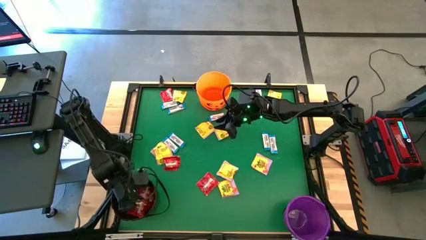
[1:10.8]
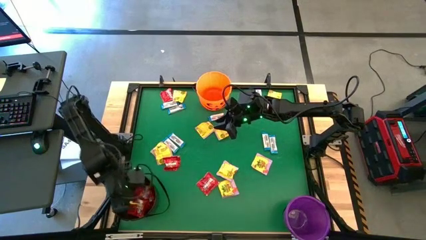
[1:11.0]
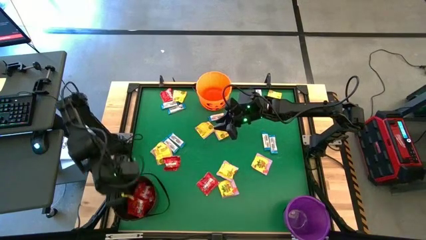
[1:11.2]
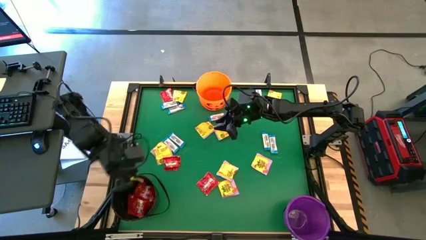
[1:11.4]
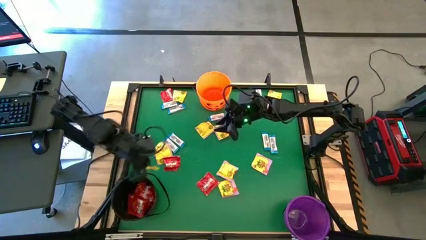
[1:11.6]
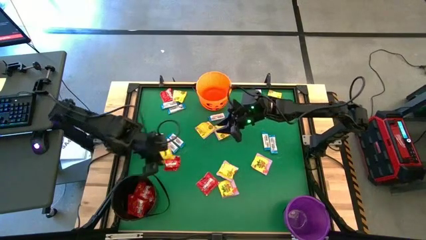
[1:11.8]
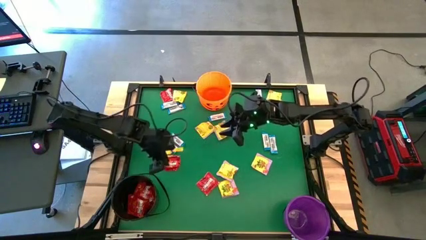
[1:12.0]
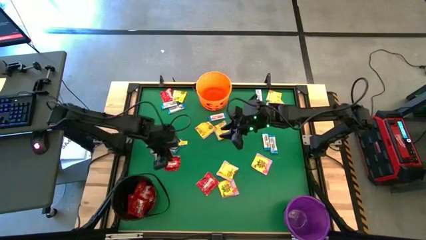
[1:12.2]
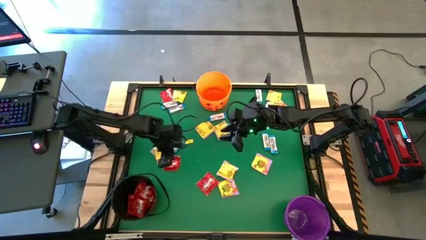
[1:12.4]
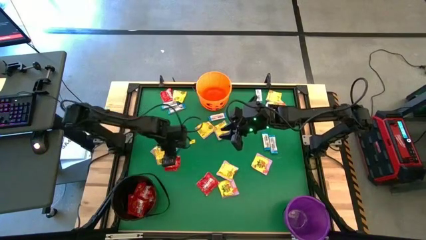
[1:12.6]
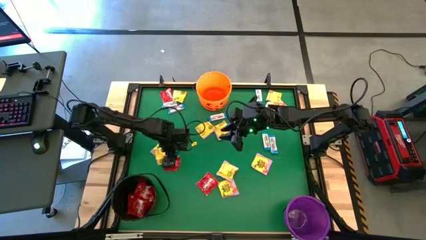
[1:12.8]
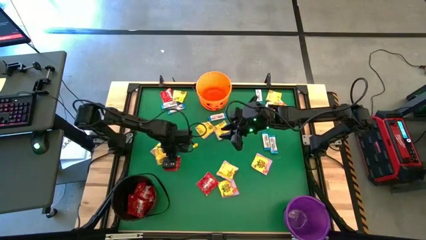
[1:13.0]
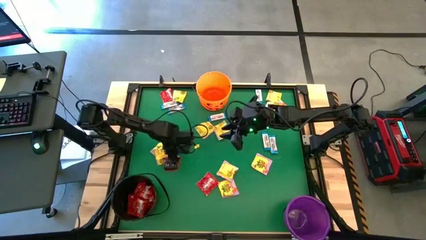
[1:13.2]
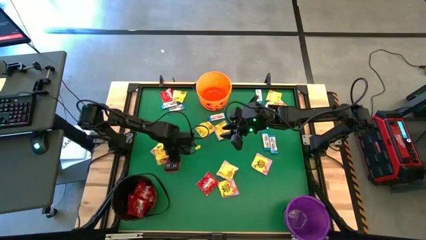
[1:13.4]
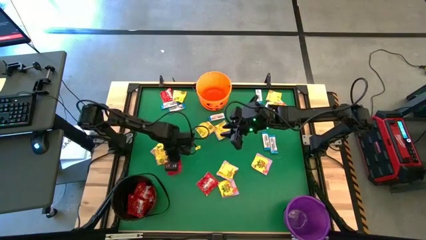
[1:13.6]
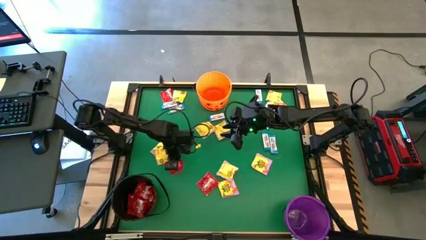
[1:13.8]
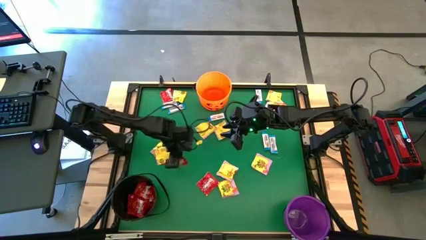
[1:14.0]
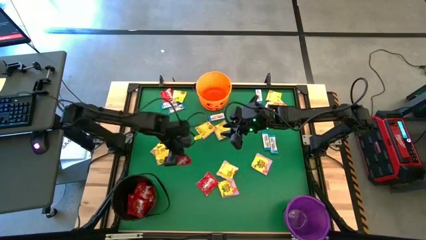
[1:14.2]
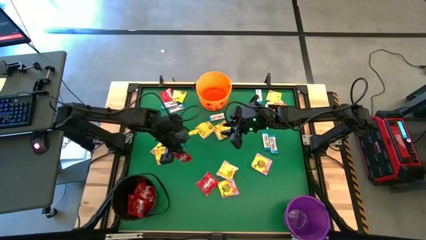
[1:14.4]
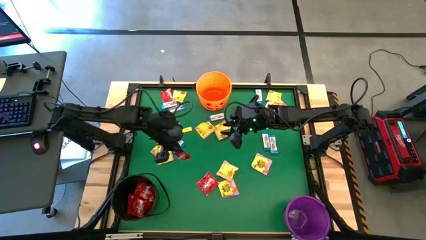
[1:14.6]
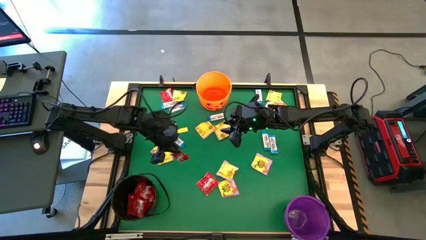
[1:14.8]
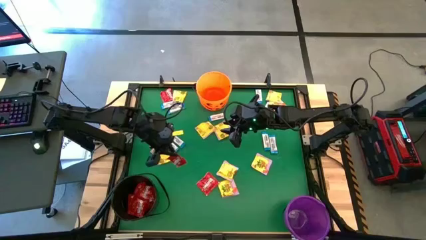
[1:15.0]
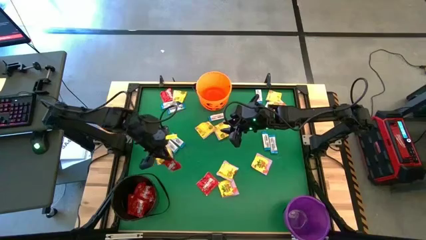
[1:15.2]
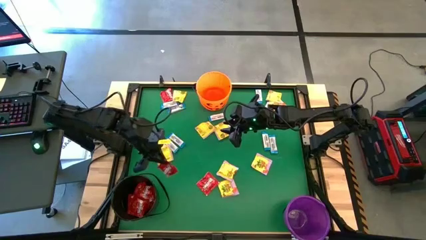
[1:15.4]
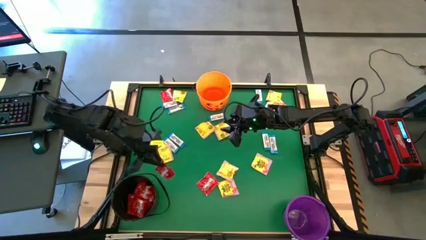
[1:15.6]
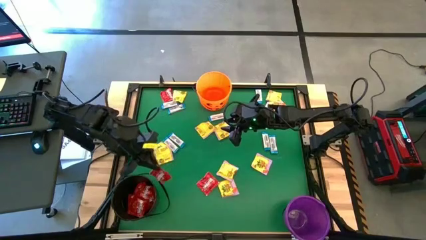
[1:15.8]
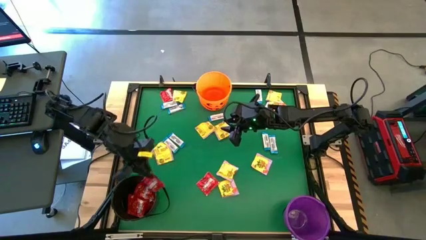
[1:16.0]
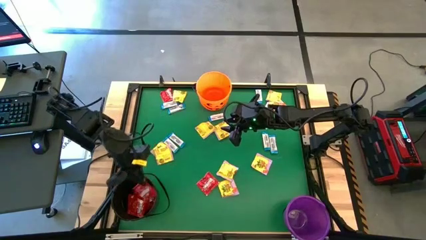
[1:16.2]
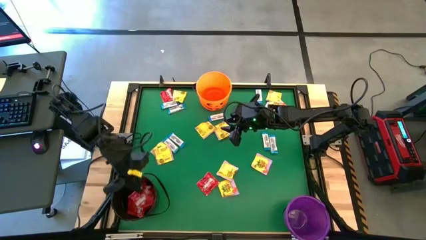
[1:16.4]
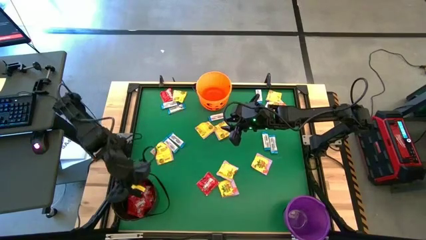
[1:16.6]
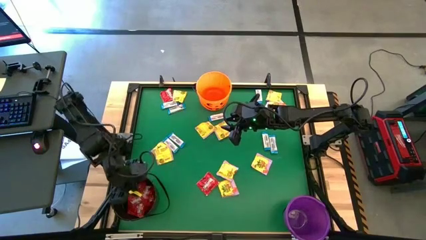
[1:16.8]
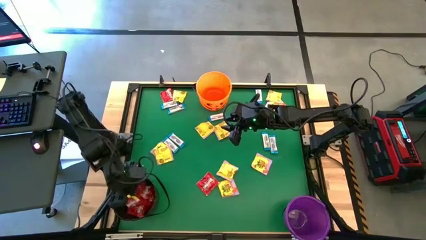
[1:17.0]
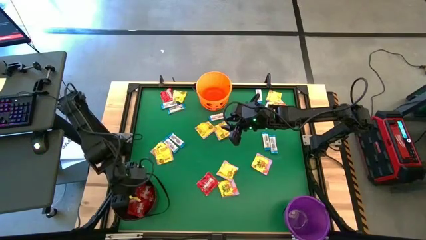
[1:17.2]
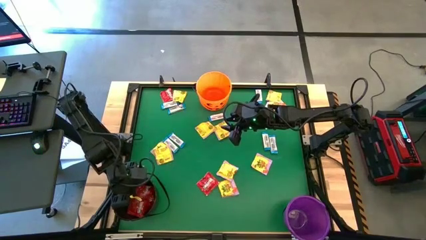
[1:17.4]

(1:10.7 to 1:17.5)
Task: Sort candy by brand, put in halloween buckets
Put the red candy into the black bucket

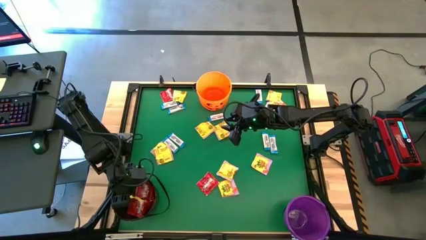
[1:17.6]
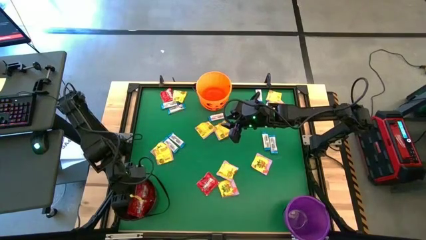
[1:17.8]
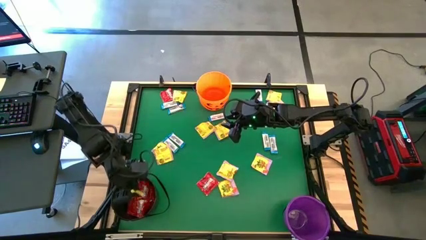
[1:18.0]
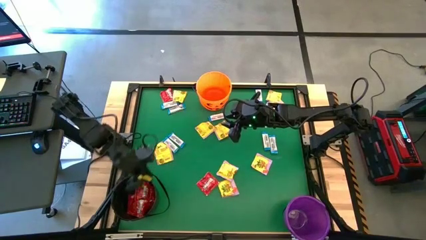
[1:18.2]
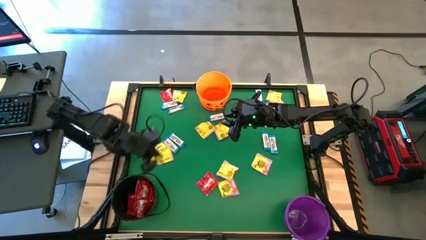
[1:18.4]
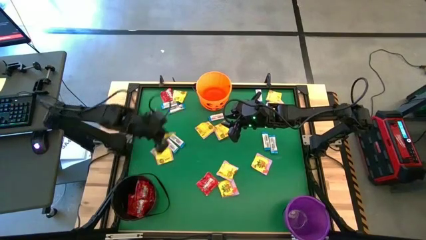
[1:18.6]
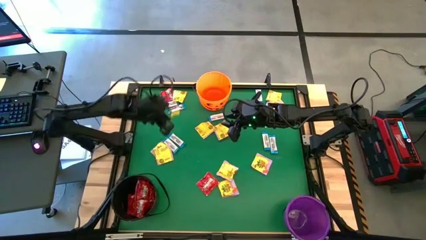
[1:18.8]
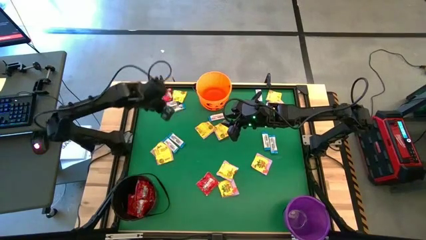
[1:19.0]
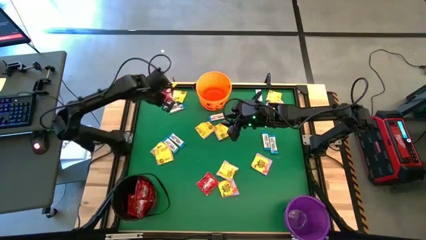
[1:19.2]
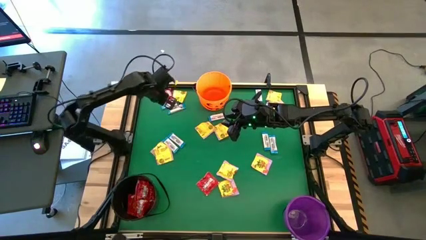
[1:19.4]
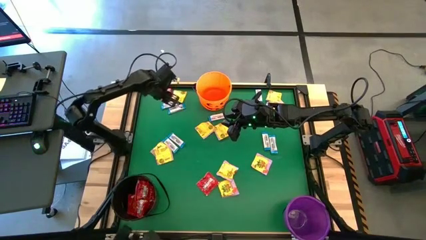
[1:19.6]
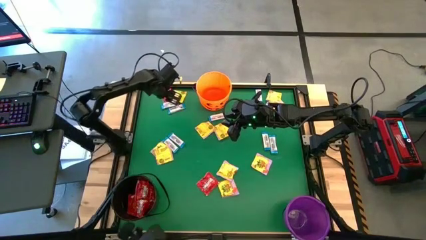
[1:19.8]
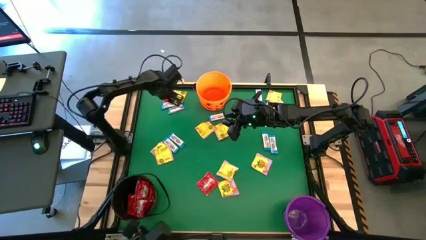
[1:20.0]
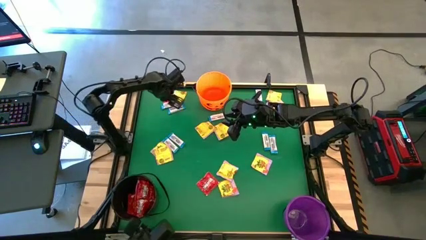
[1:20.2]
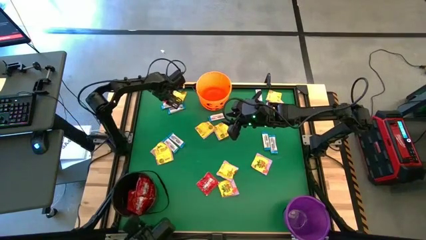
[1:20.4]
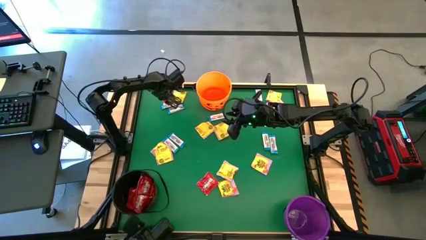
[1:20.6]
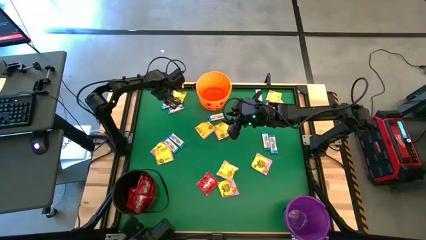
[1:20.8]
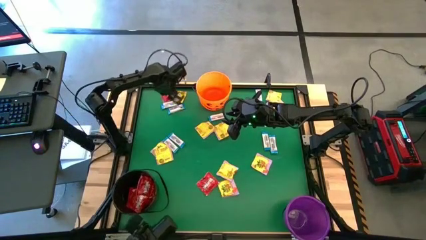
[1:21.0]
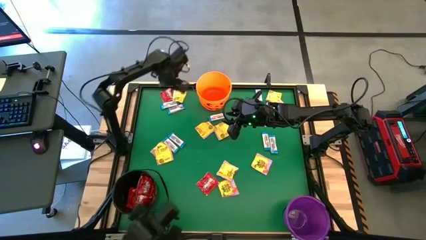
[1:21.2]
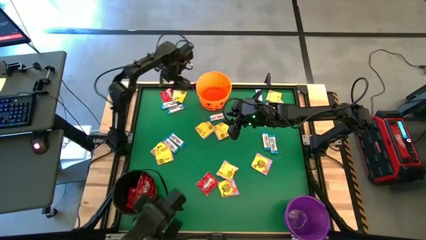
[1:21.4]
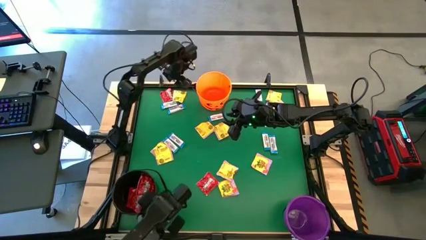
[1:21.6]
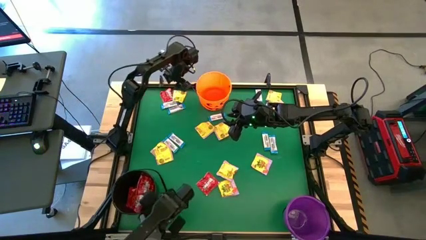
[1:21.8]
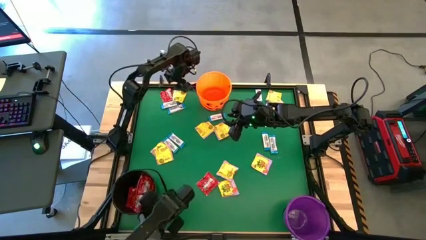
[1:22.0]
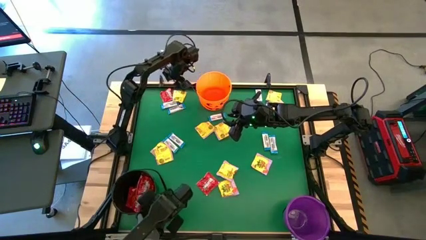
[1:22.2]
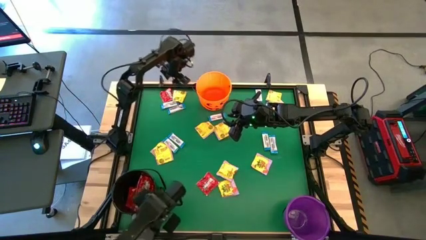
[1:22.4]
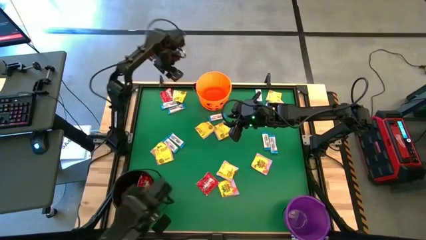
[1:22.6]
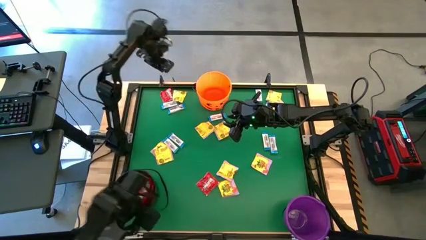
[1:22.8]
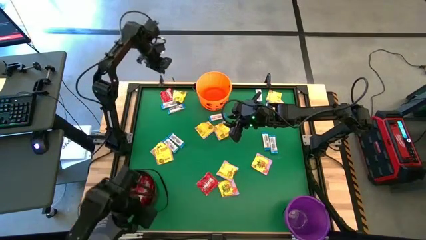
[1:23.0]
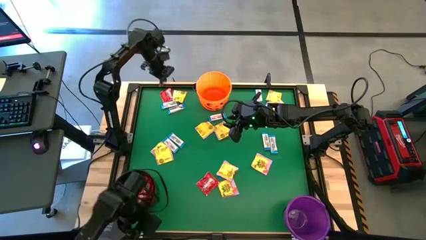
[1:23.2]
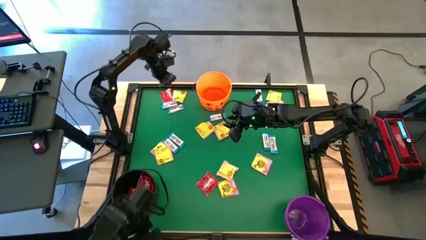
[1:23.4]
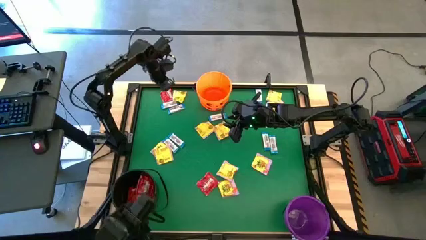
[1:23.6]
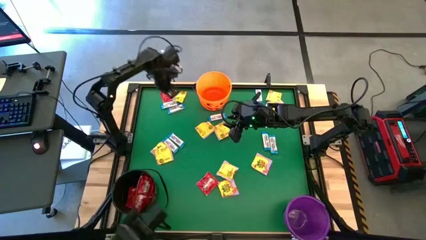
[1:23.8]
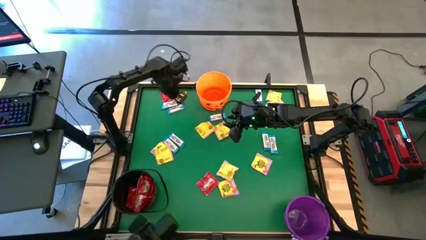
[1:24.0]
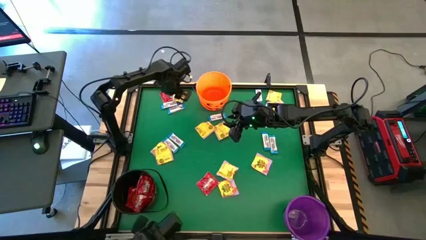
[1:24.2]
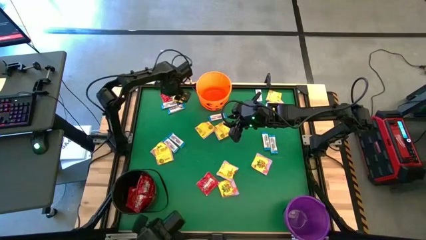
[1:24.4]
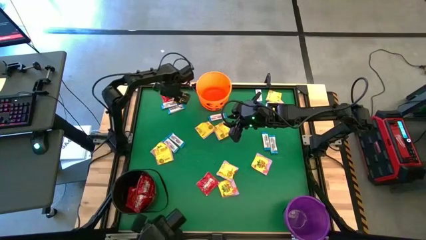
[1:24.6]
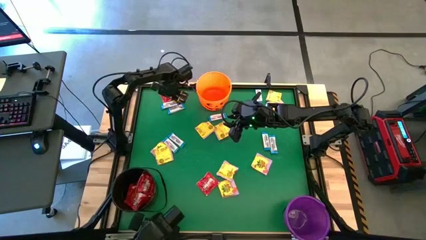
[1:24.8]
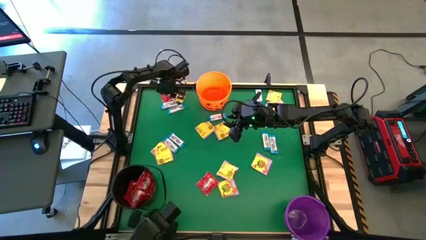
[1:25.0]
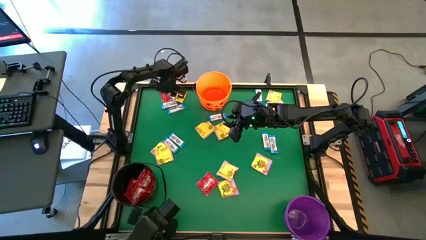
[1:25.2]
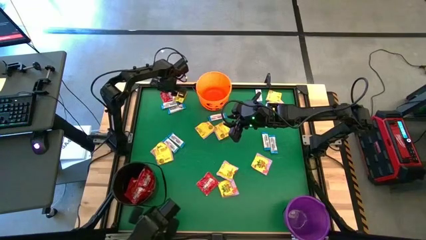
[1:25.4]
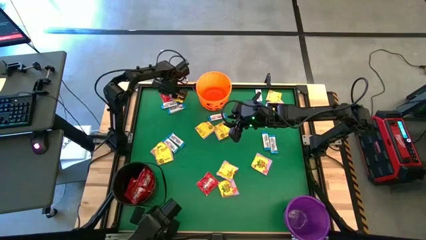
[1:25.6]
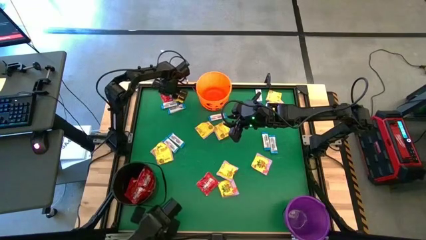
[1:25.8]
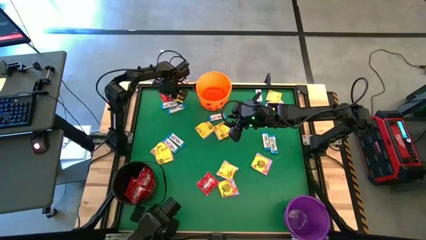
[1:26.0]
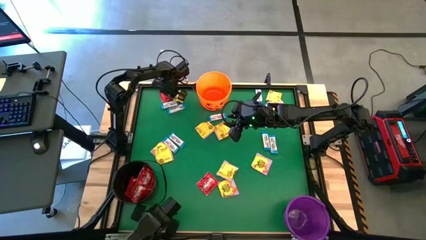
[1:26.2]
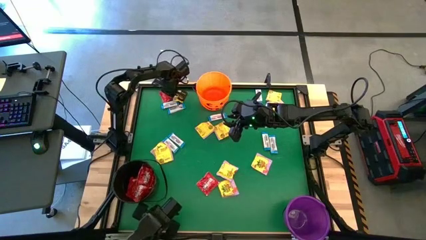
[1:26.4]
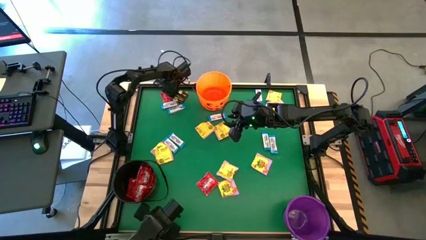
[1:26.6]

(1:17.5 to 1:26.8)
Put the red candy into the black bucket
